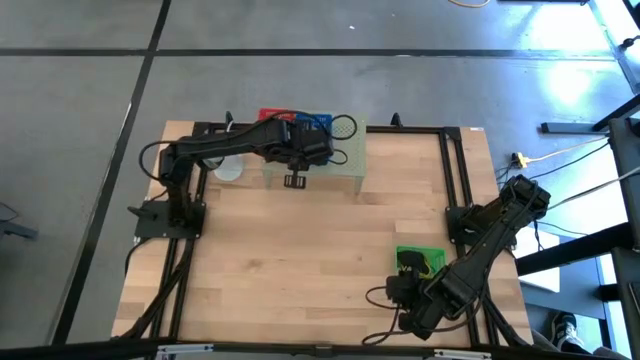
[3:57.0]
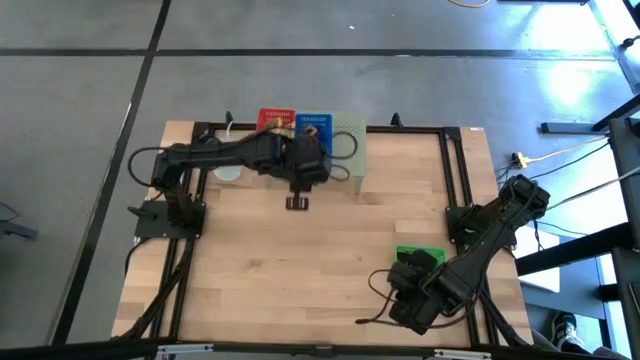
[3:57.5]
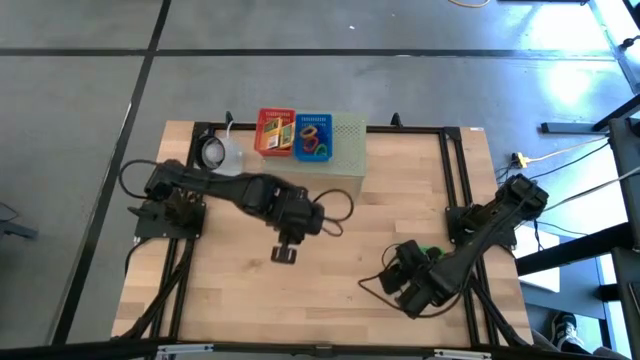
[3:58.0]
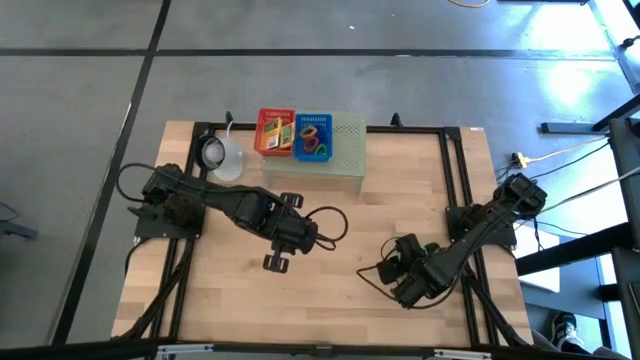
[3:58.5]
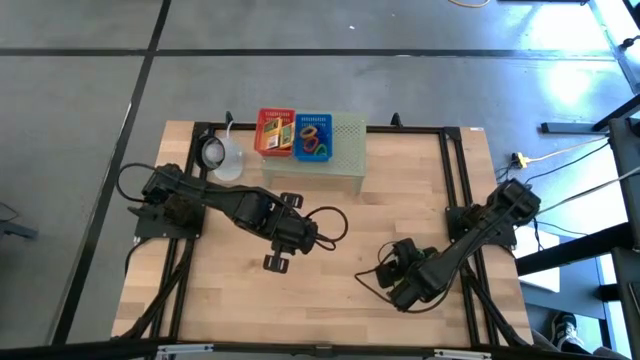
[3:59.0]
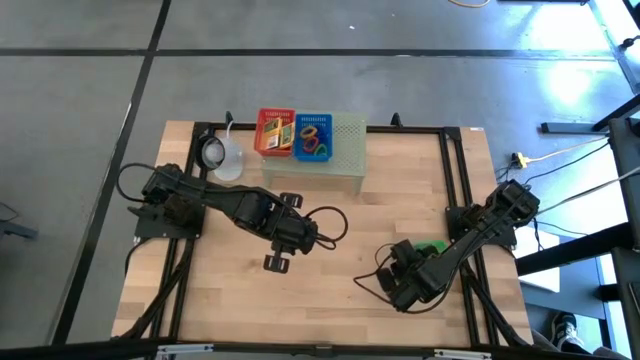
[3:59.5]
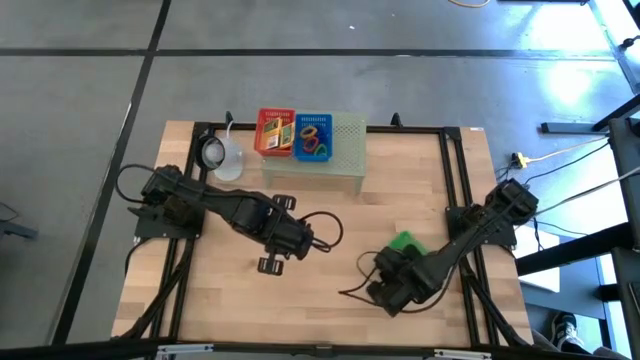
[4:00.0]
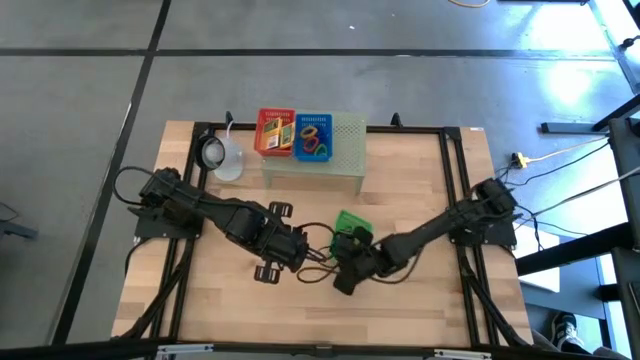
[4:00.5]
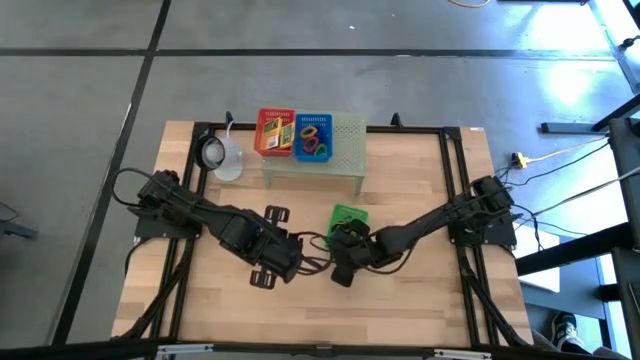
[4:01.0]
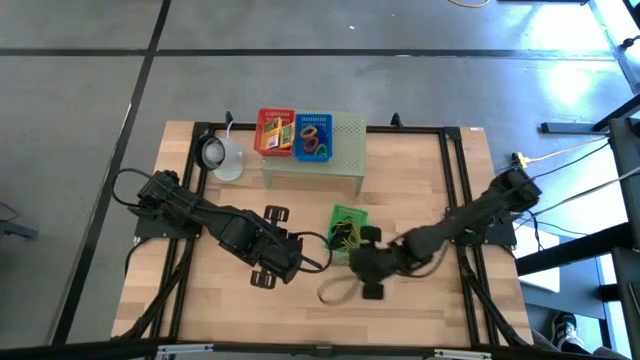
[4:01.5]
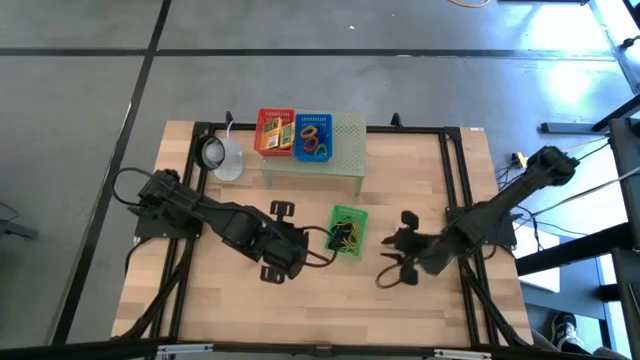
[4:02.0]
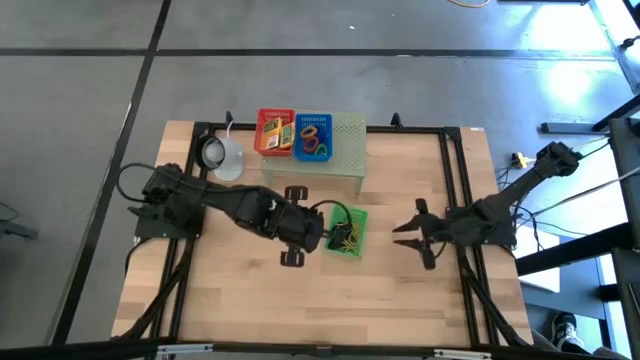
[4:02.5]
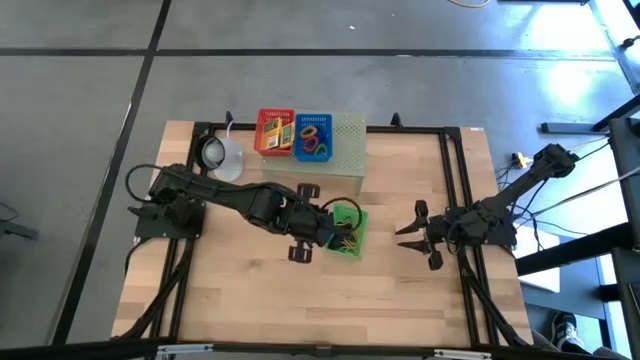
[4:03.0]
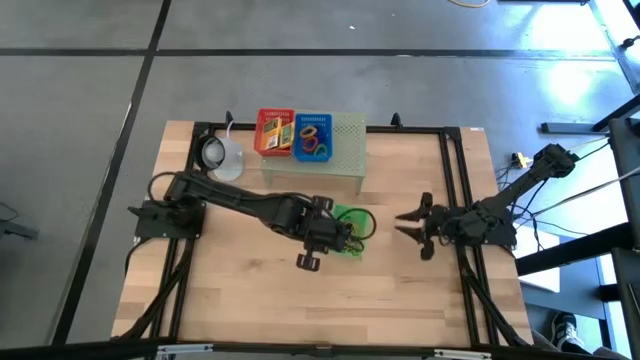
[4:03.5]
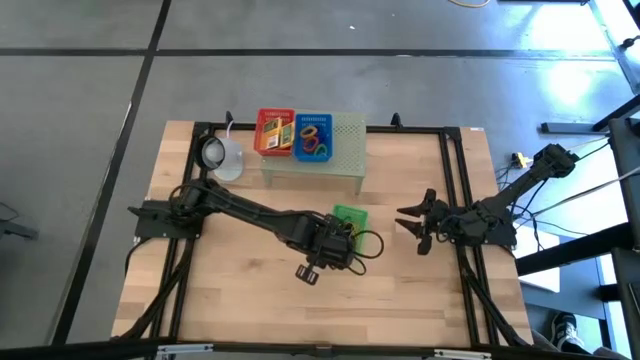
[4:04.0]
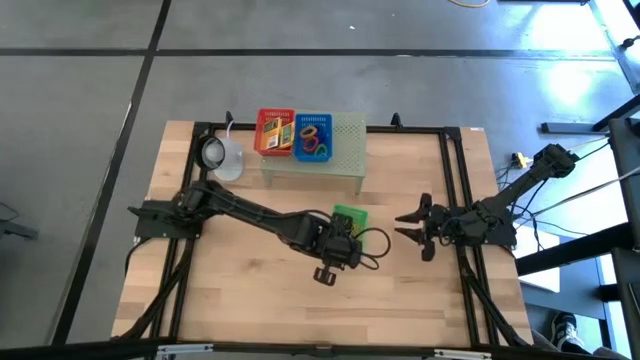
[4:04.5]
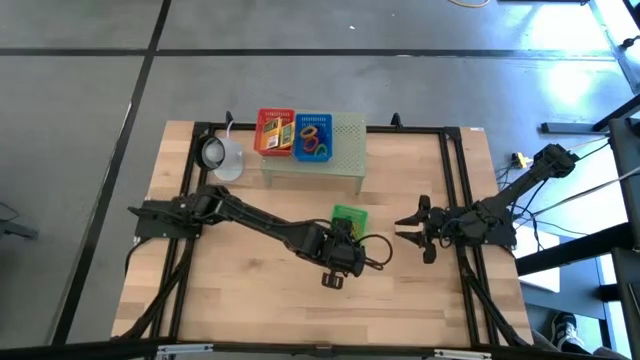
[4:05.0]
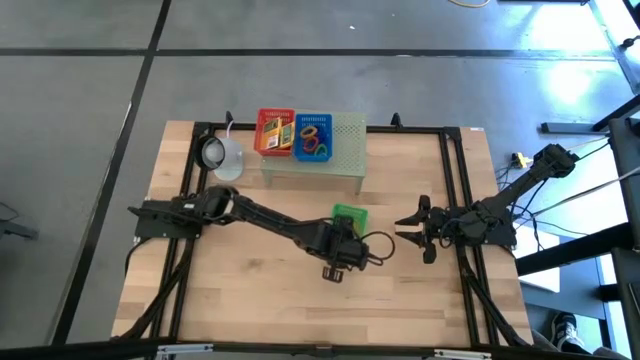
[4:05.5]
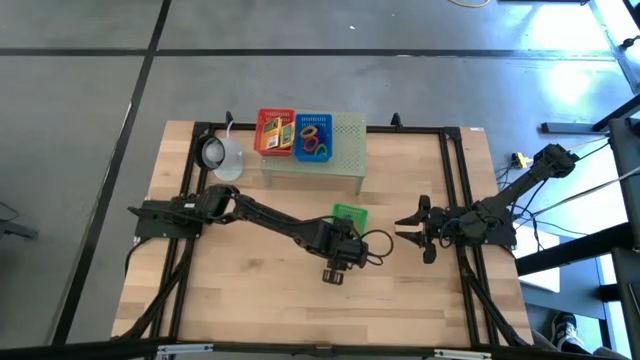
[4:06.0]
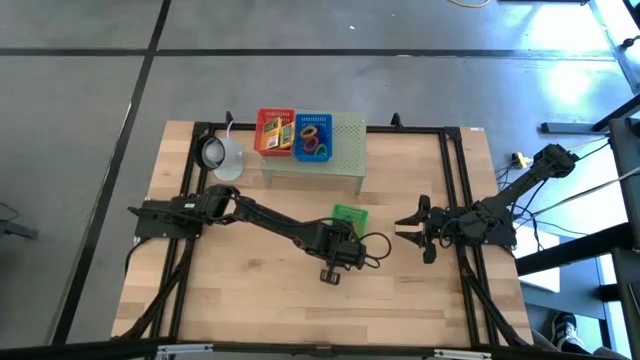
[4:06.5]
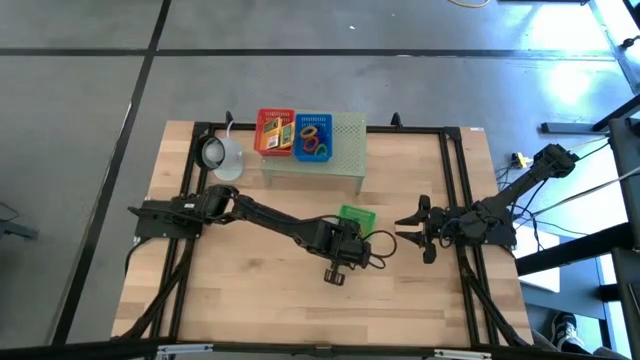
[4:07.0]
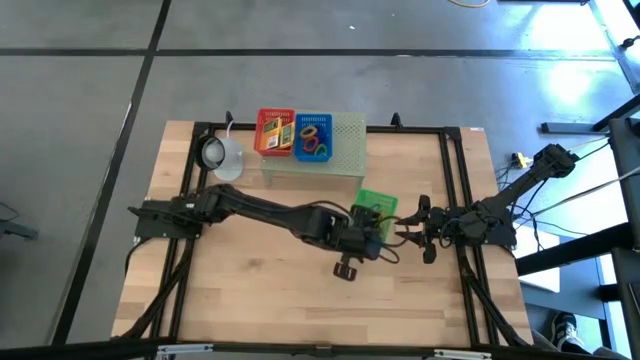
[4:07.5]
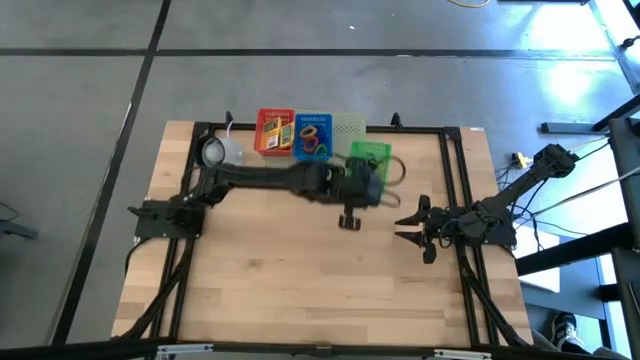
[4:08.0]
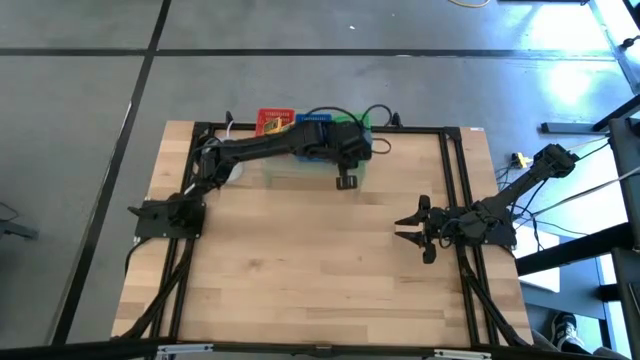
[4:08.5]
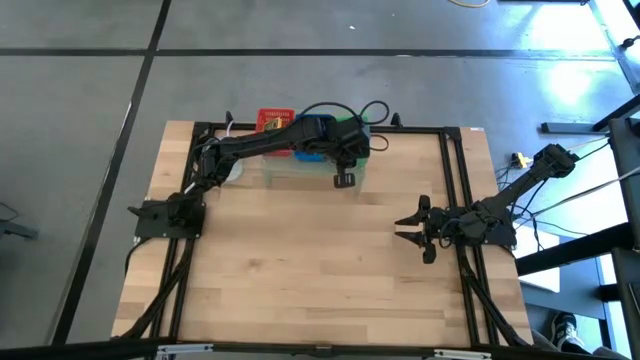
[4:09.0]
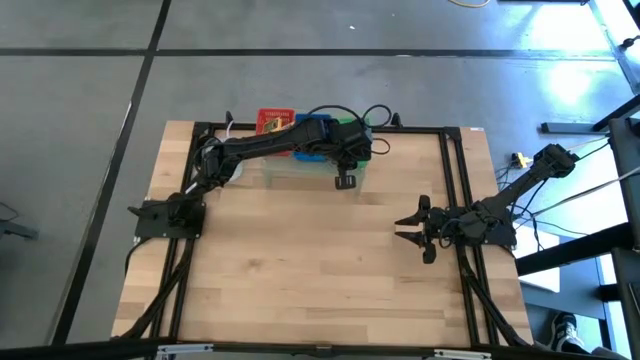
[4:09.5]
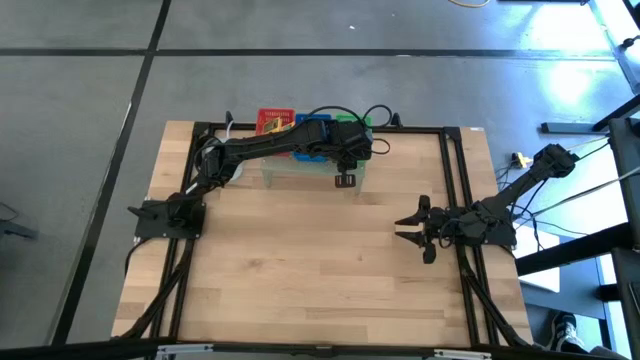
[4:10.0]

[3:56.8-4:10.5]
Task: Pick & Place Office Desk Supplies
Put the green bin on the shelf

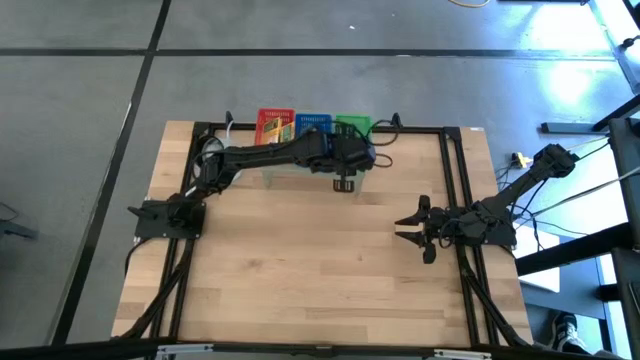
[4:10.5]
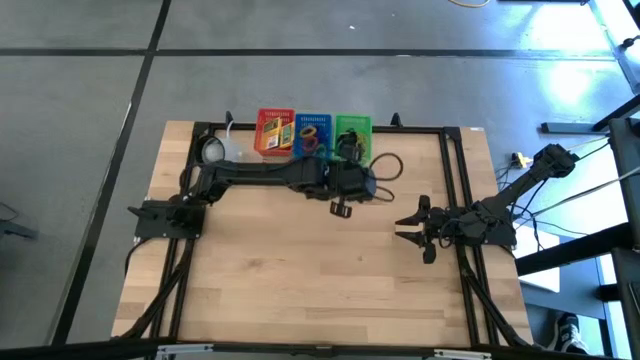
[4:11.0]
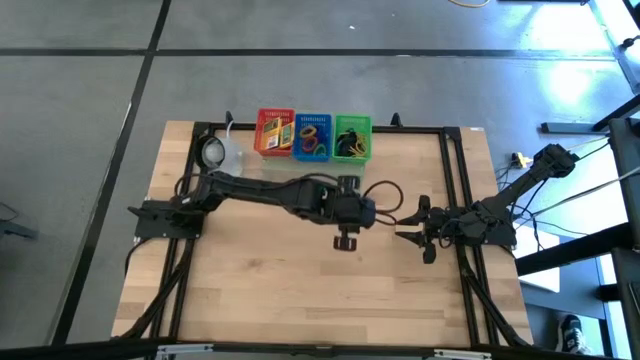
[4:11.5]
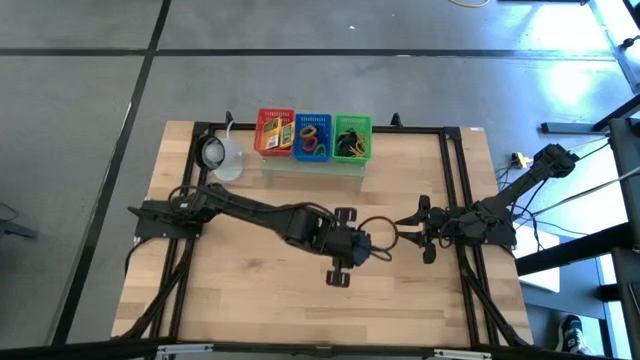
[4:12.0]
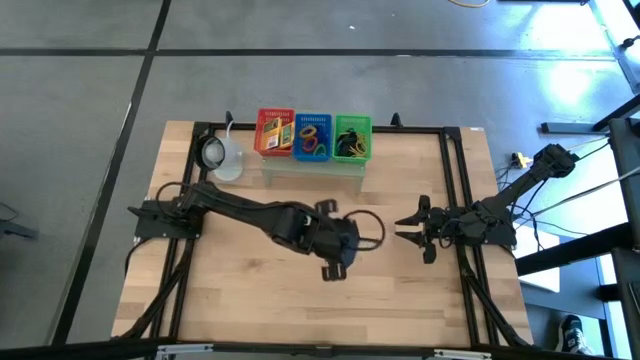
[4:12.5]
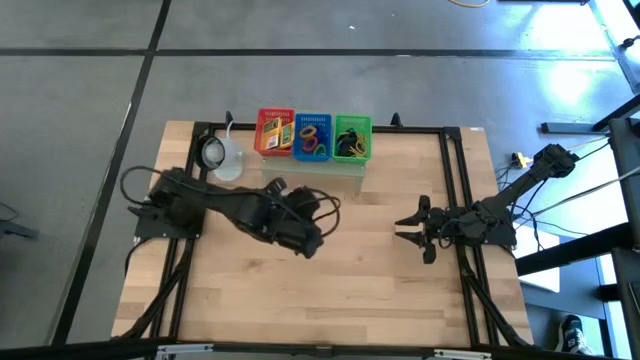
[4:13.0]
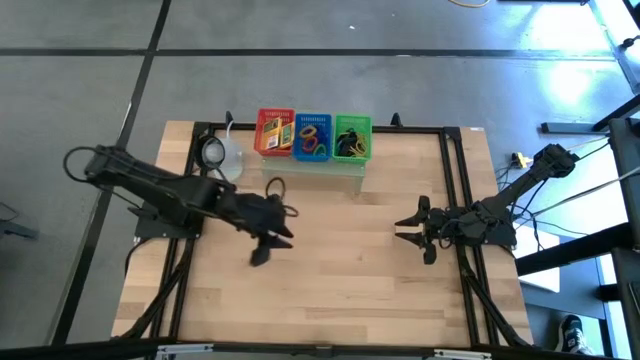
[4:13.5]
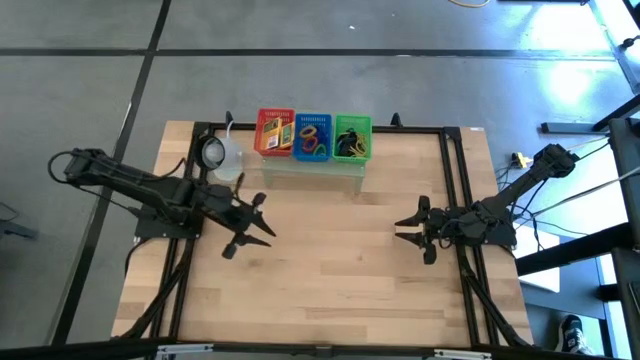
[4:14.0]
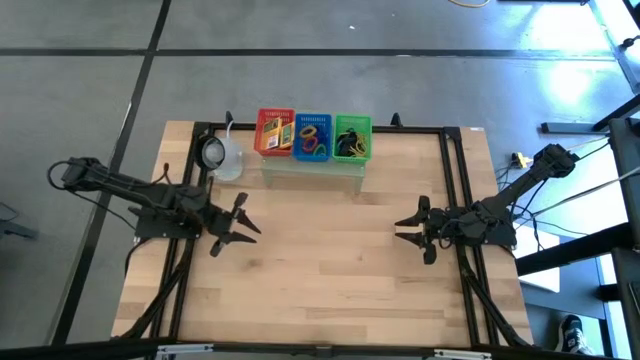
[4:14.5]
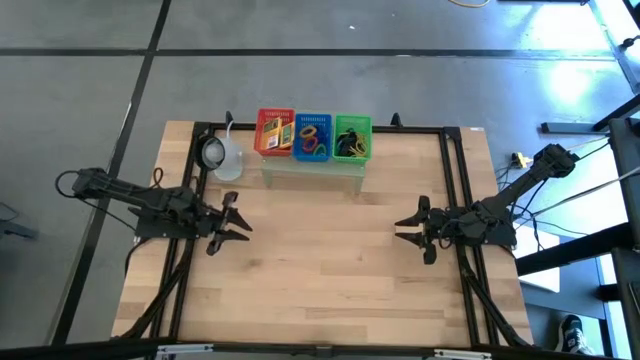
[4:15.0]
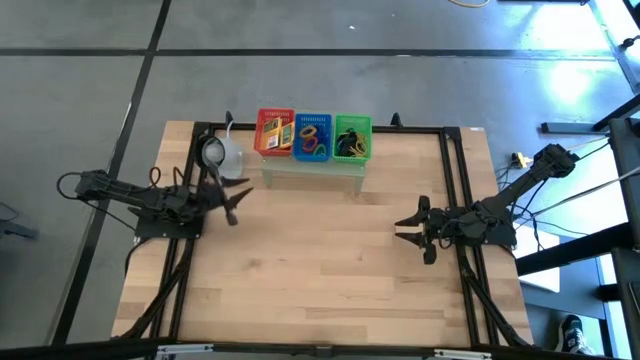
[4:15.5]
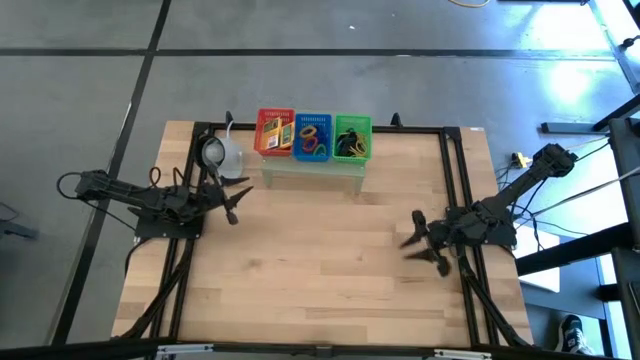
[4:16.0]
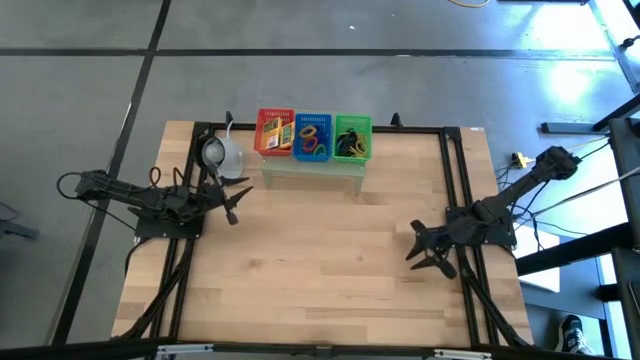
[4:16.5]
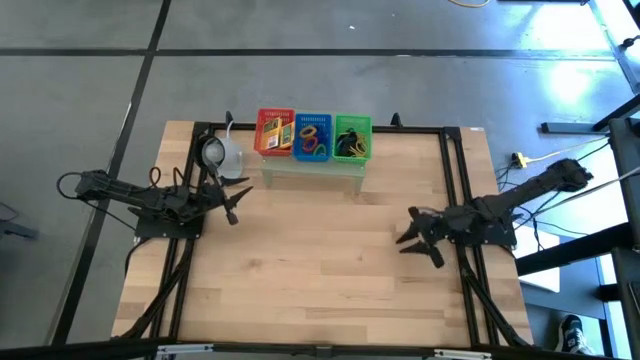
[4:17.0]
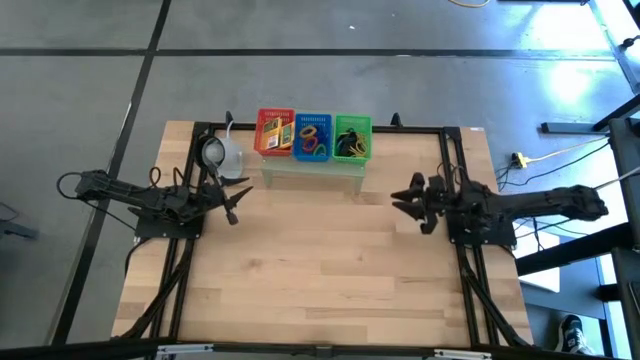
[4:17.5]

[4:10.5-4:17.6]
Return to Home Position
